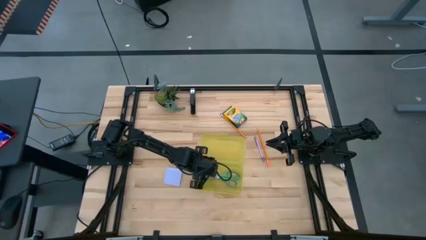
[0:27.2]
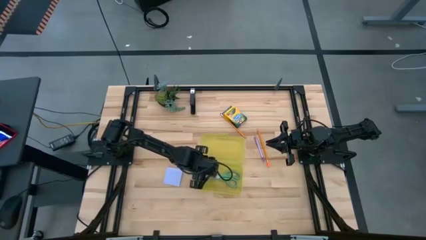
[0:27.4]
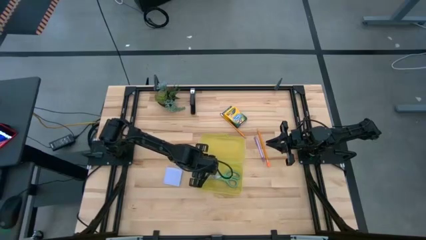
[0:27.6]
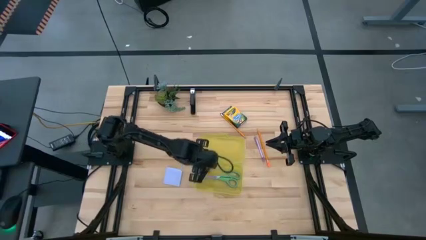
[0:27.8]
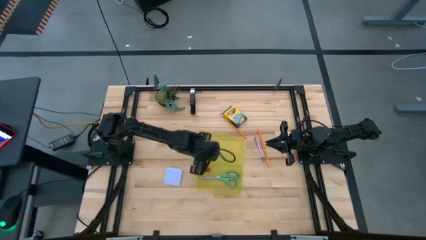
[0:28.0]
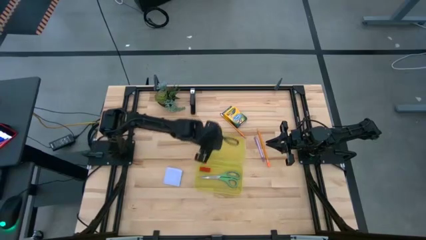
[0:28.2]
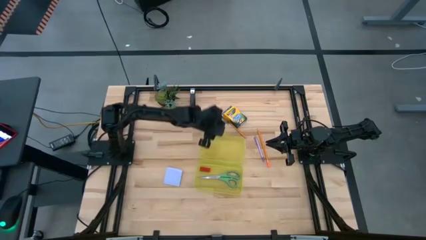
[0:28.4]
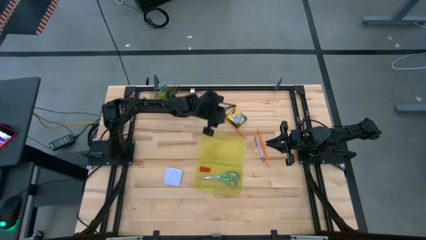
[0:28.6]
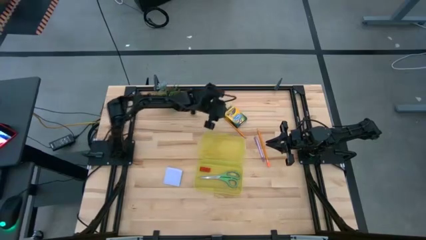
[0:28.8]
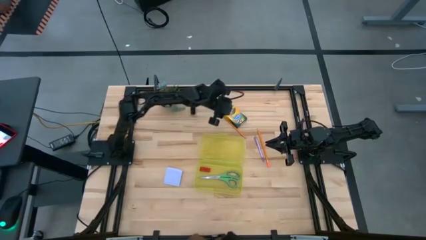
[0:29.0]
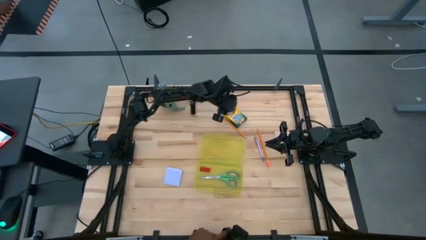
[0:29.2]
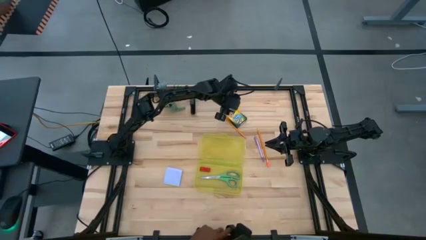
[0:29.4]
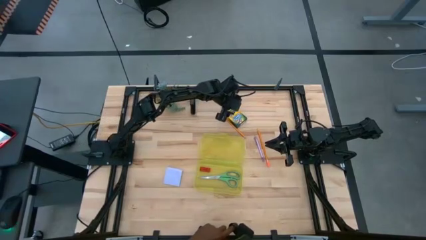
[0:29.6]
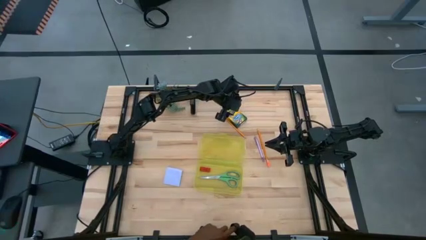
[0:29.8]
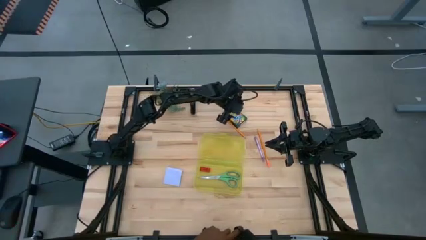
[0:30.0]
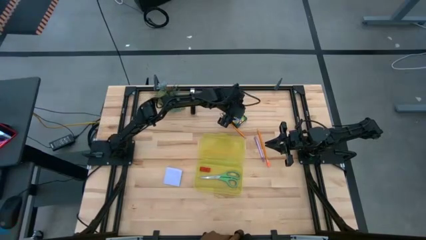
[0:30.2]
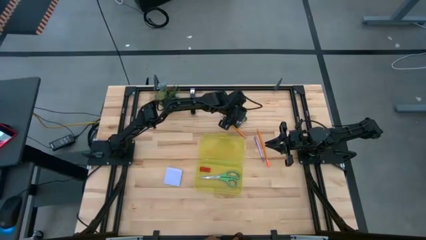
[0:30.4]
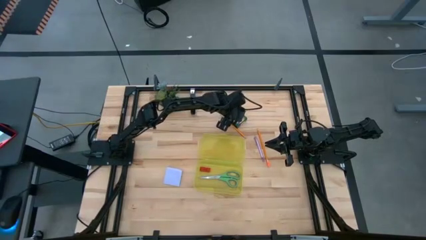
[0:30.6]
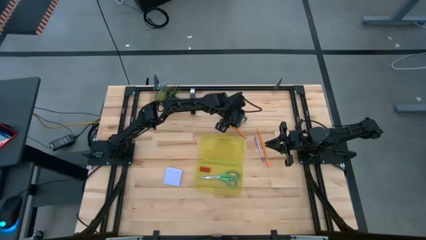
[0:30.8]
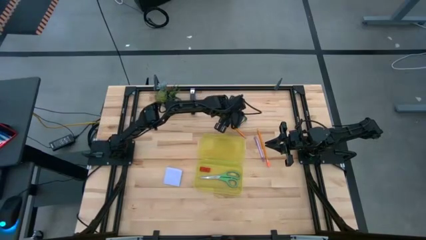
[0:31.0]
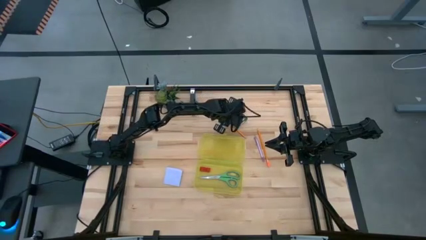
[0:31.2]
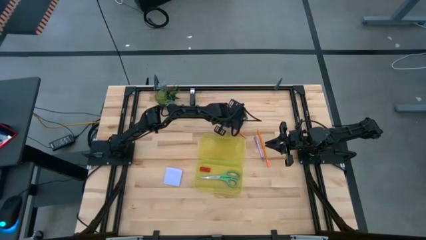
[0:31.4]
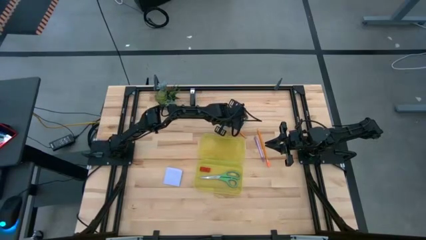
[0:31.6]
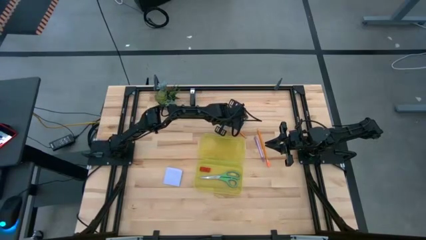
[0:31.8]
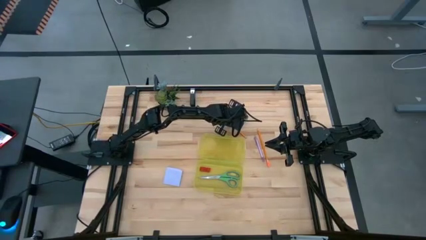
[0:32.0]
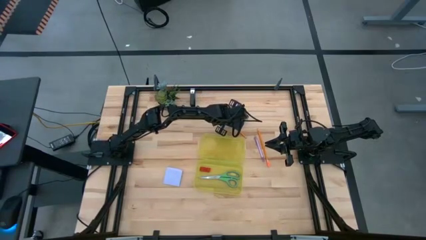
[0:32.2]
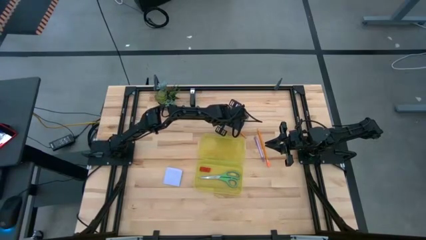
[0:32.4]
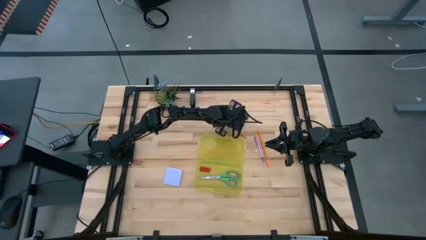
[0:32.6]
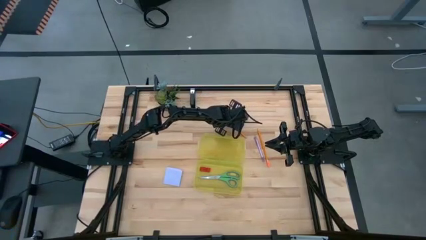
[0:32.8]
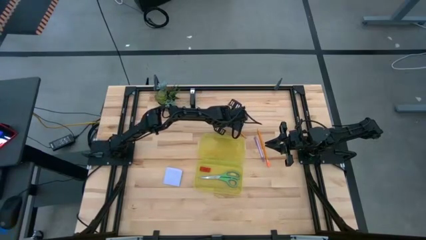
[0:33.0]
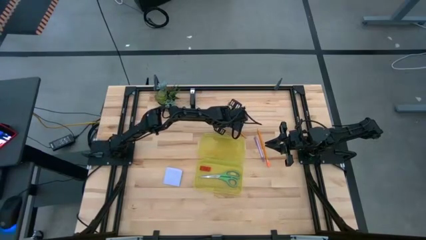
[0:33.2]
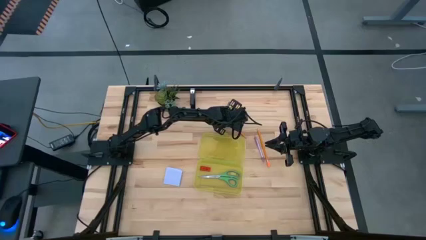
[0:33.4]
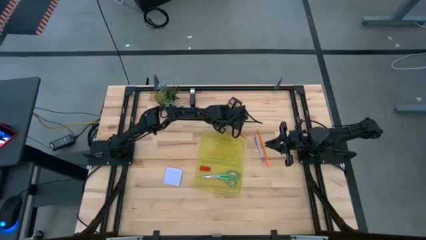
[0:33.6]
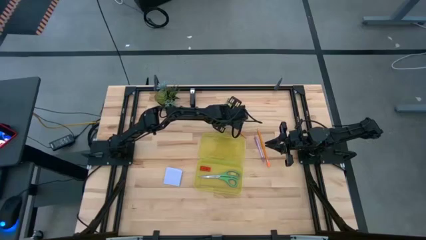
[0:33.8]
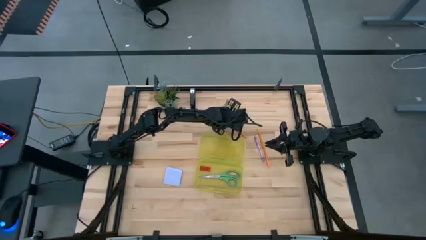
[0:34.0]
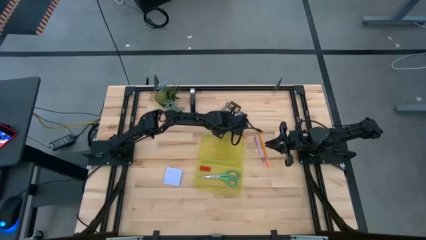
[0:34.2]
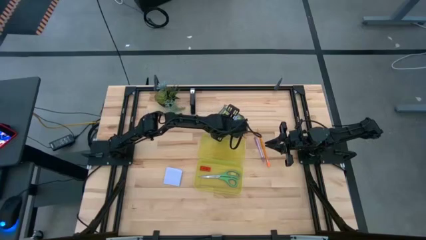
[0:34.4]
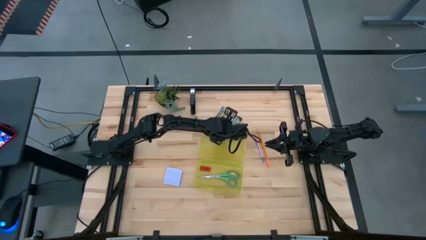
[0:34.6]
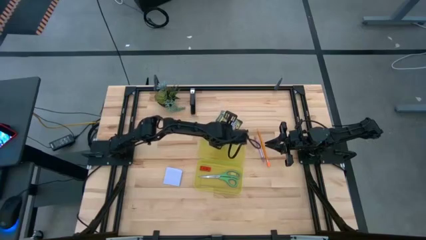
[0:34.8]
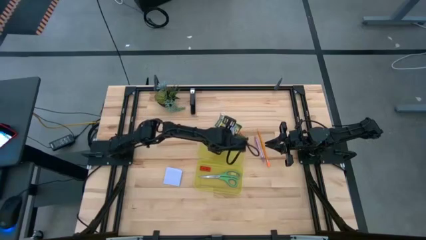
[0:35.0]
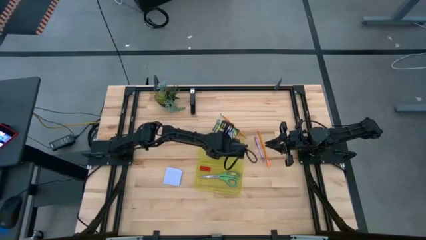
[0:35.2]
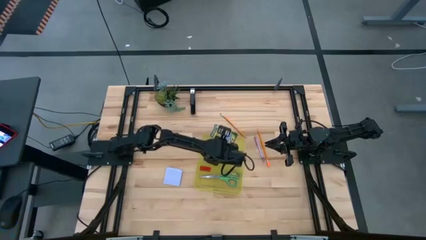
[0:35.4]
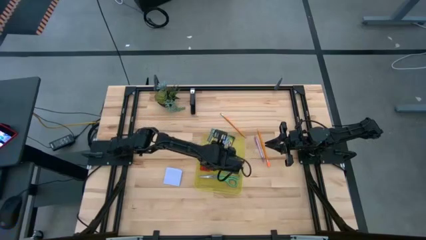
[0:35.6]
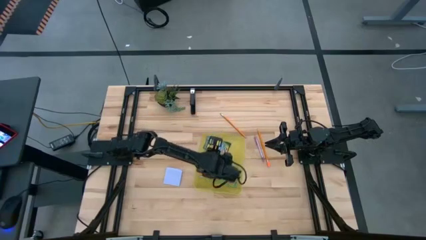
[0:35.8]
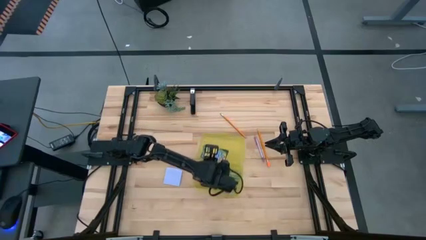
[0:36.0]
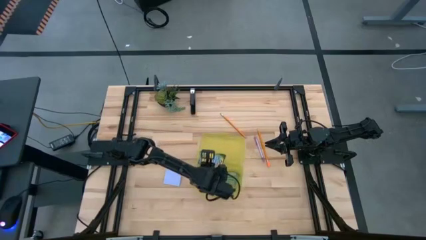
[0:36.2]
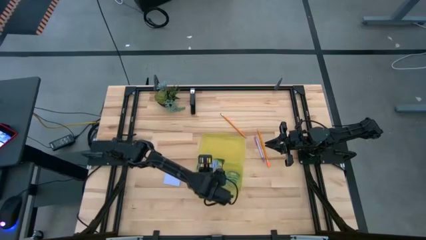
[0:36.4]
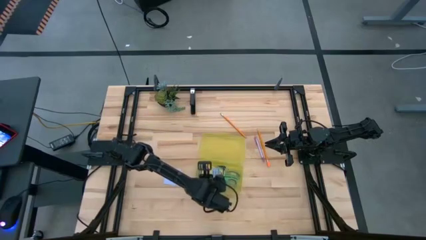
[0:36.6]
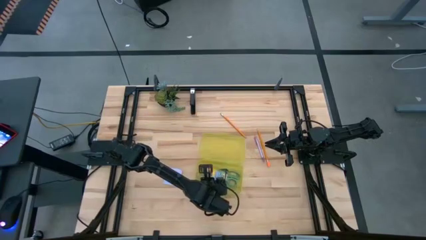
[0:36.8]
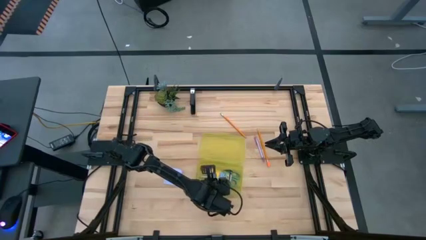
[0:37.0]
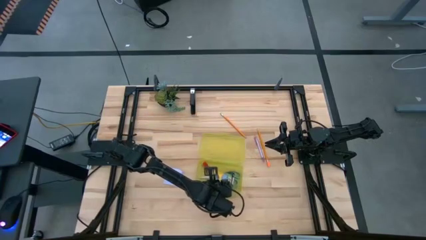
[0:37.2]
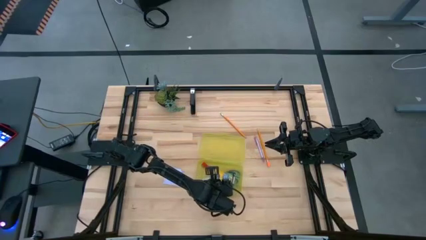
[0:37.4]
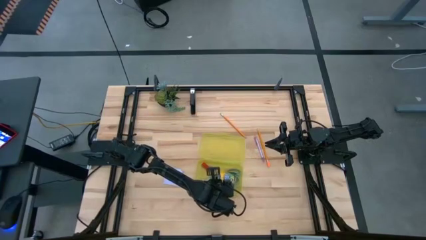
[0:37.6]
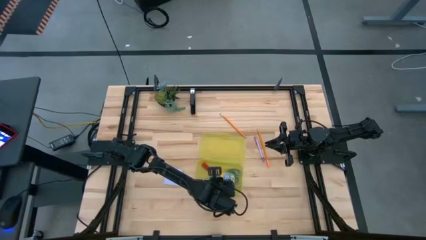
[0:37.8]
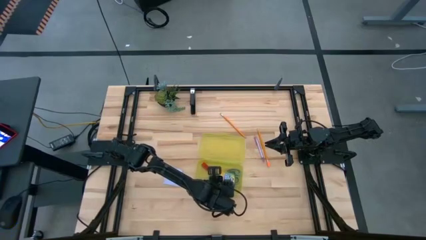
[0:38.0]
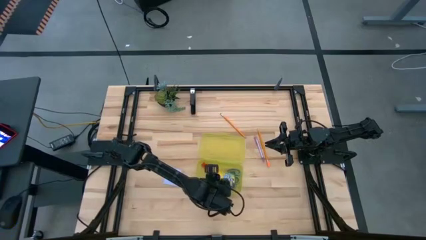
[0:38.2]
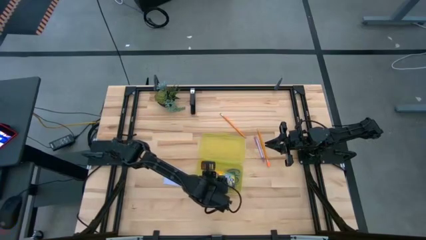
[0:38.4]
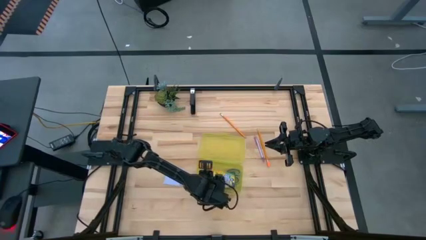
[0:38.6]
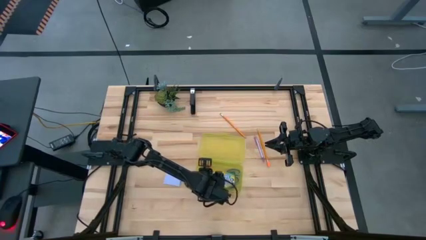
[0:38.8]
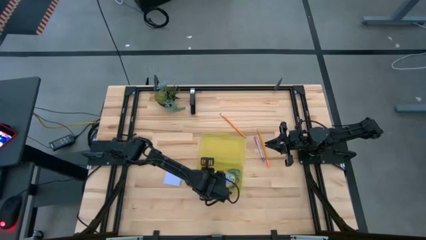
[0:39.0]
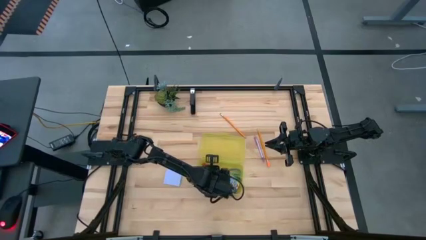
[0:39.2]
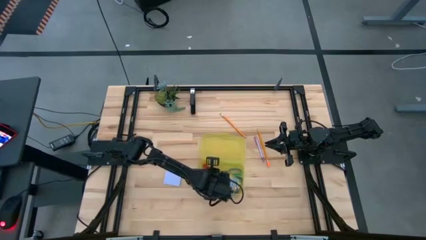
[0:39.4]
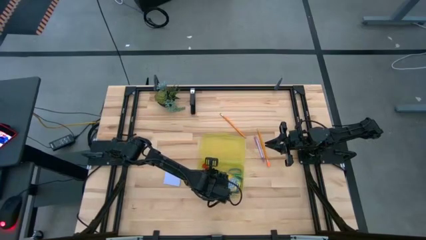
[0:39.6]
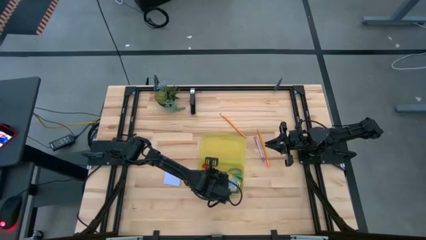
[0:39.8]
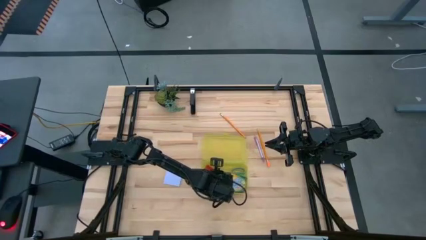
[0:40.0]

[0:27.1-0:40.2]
Task: Pack school essentials
Put the yellow crayon box into the yellow supply box
